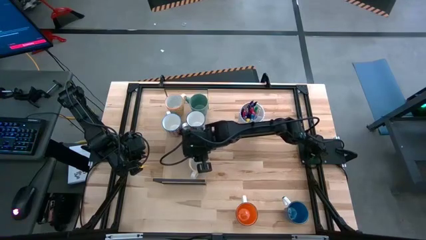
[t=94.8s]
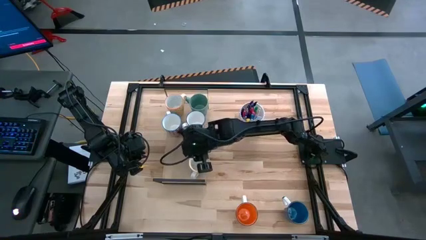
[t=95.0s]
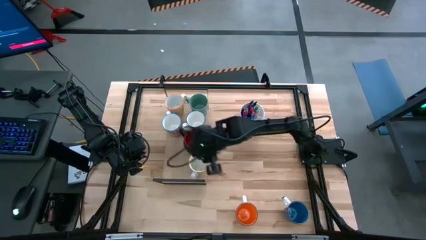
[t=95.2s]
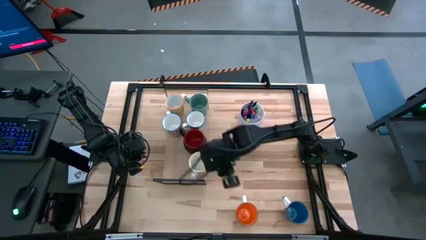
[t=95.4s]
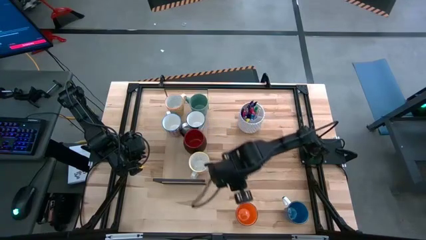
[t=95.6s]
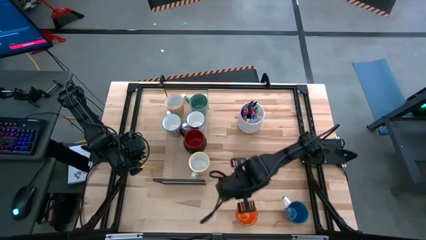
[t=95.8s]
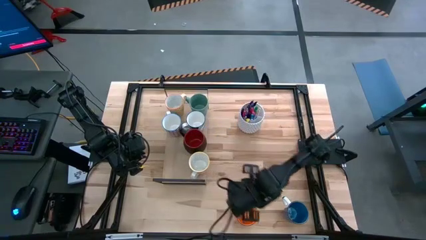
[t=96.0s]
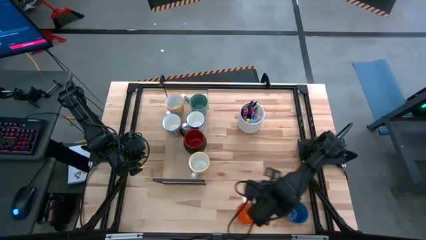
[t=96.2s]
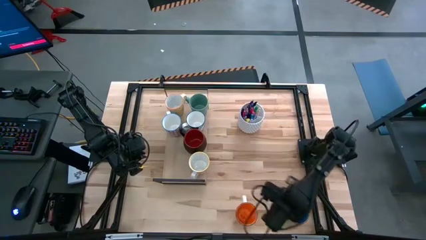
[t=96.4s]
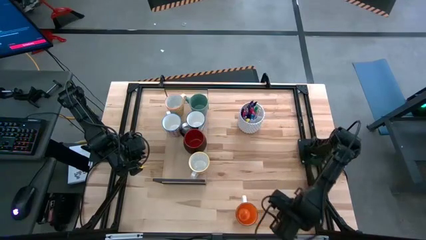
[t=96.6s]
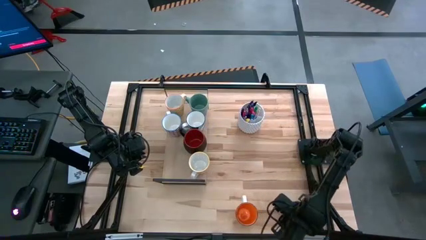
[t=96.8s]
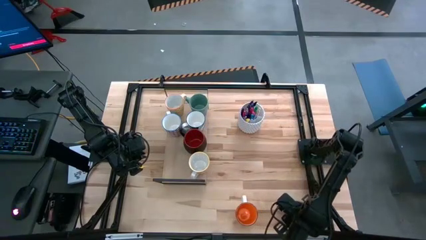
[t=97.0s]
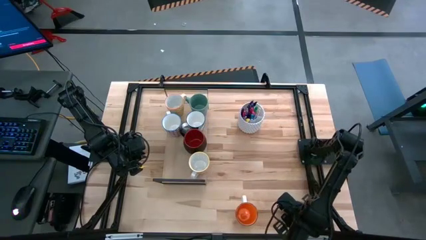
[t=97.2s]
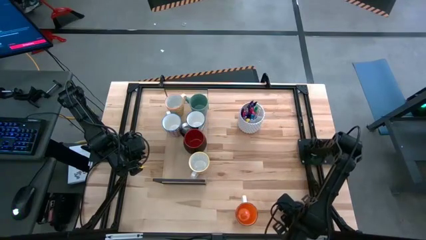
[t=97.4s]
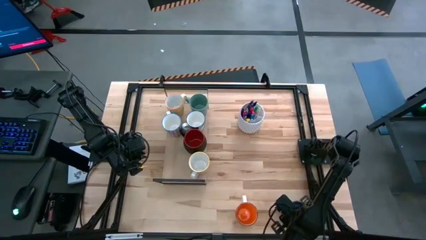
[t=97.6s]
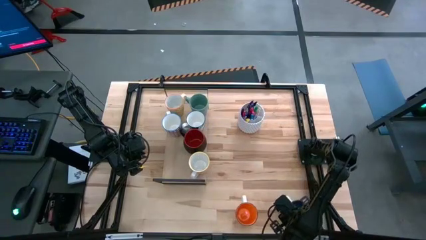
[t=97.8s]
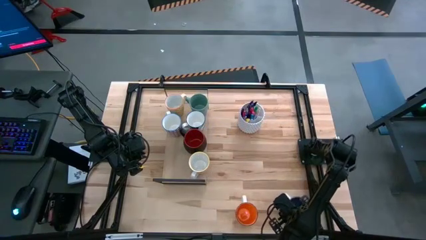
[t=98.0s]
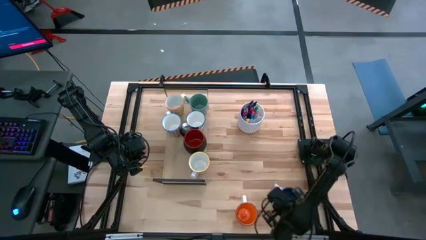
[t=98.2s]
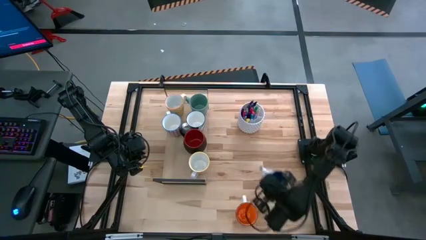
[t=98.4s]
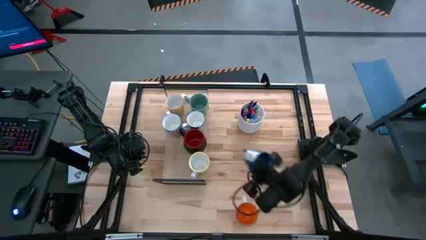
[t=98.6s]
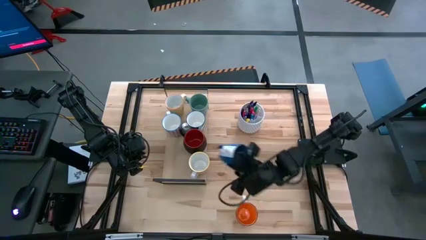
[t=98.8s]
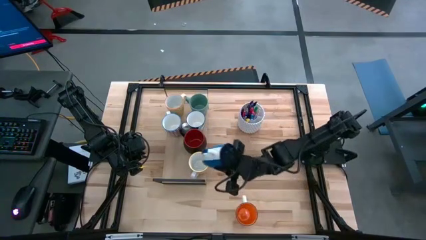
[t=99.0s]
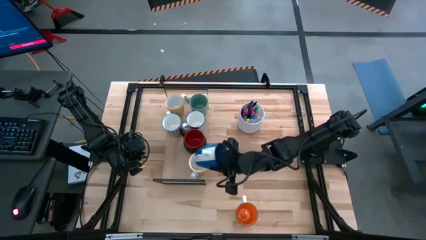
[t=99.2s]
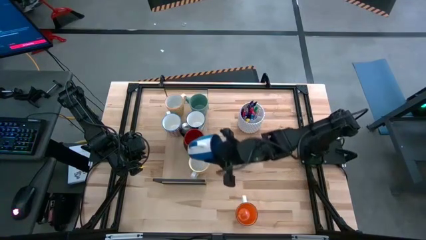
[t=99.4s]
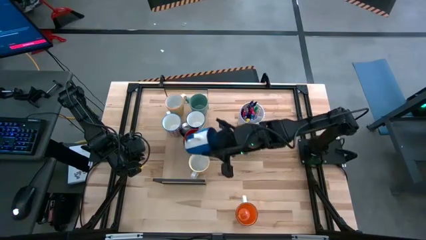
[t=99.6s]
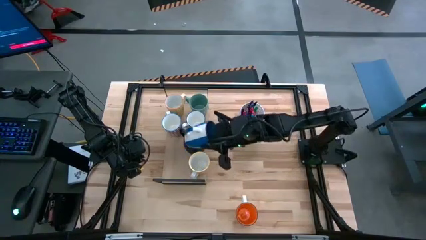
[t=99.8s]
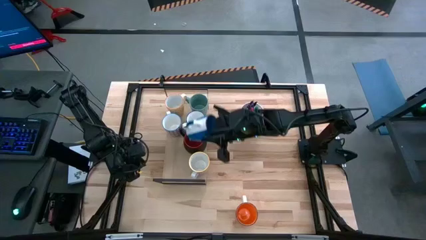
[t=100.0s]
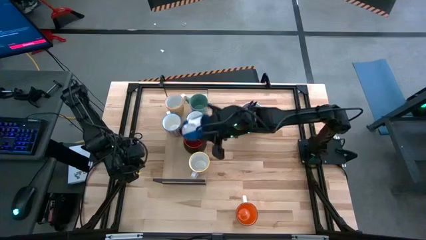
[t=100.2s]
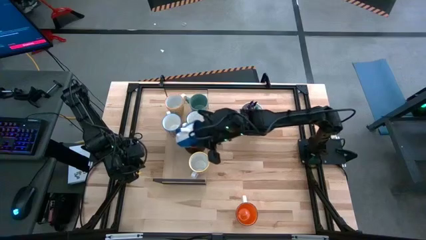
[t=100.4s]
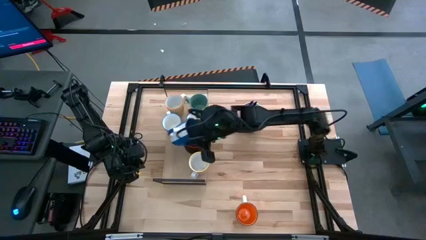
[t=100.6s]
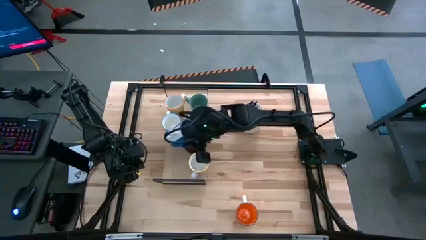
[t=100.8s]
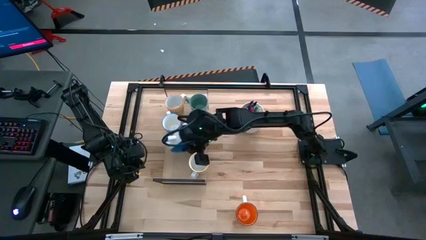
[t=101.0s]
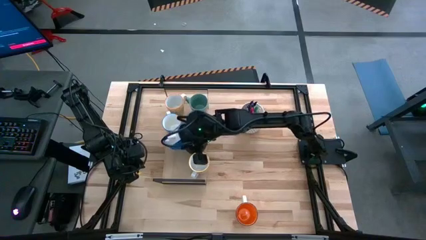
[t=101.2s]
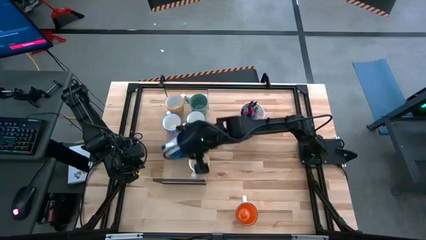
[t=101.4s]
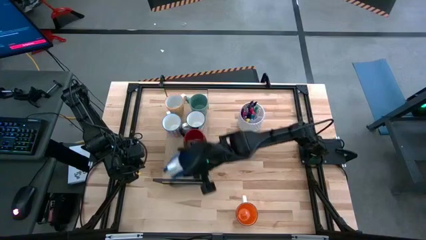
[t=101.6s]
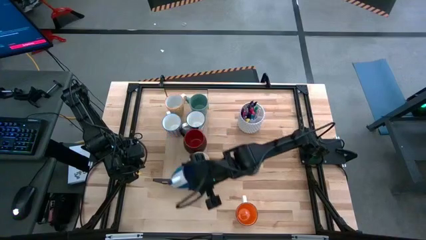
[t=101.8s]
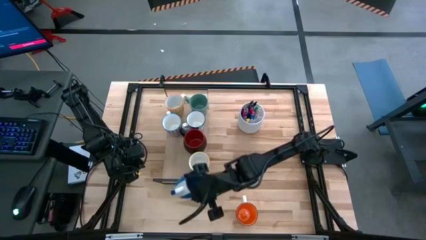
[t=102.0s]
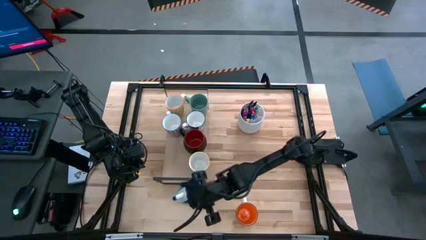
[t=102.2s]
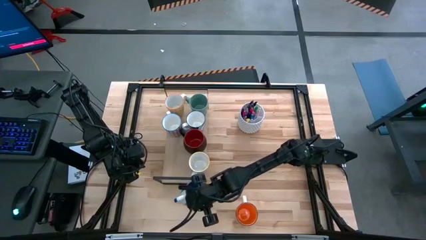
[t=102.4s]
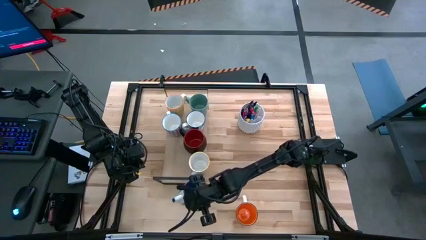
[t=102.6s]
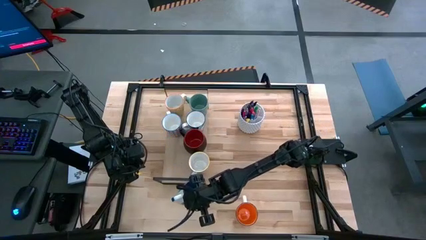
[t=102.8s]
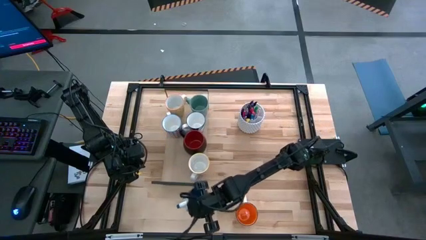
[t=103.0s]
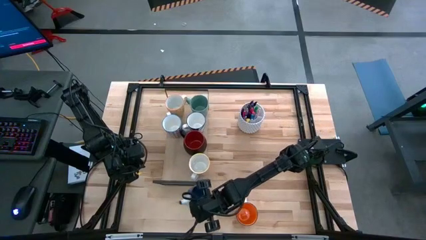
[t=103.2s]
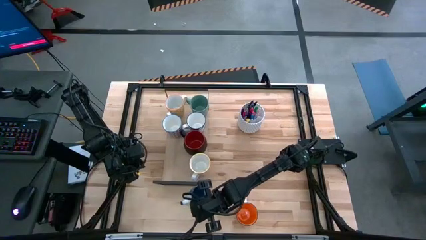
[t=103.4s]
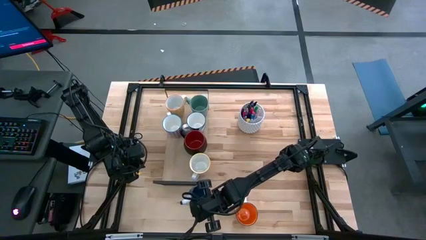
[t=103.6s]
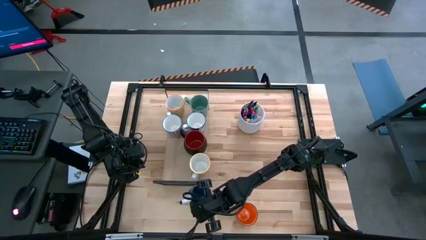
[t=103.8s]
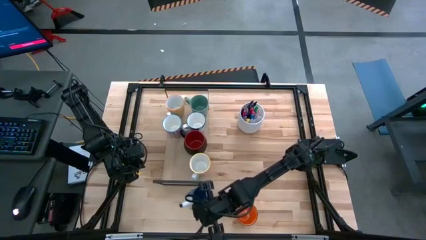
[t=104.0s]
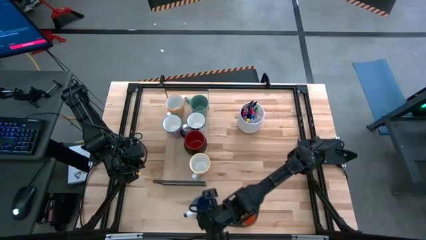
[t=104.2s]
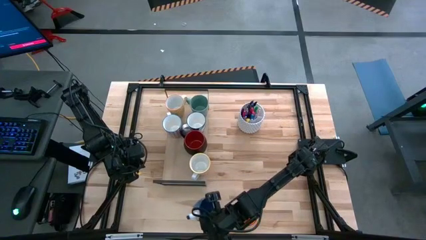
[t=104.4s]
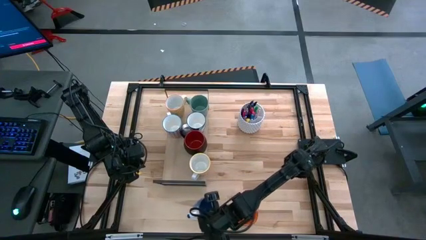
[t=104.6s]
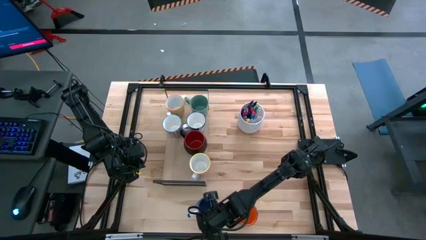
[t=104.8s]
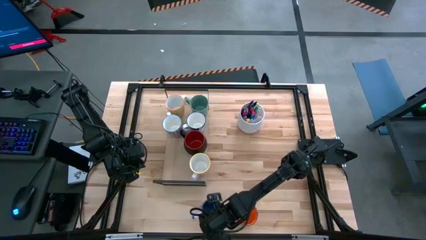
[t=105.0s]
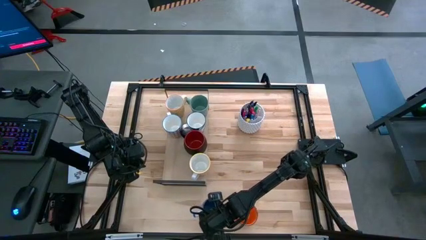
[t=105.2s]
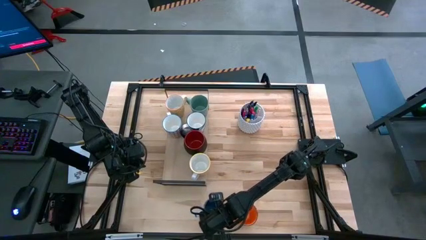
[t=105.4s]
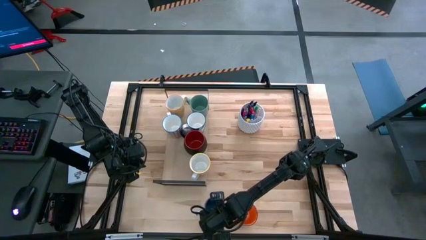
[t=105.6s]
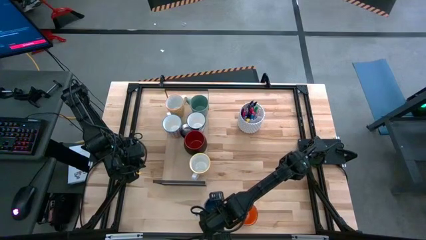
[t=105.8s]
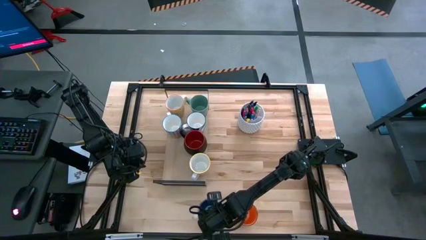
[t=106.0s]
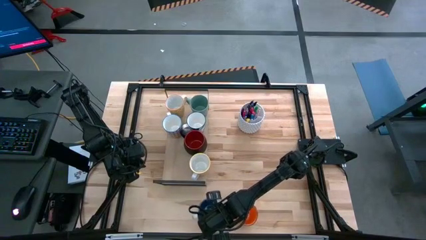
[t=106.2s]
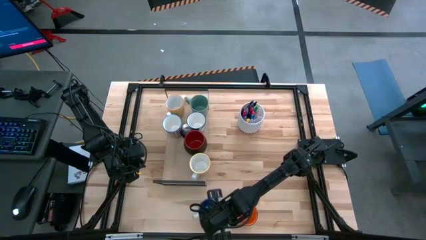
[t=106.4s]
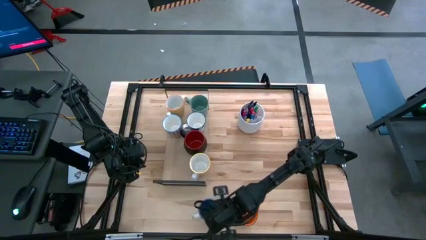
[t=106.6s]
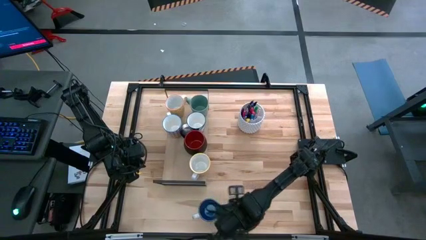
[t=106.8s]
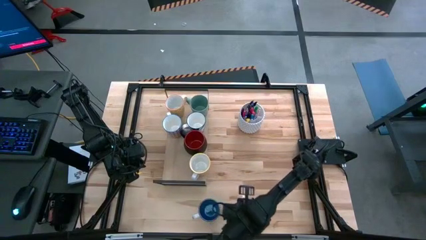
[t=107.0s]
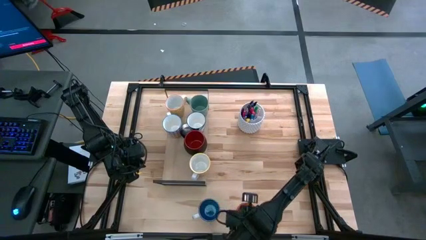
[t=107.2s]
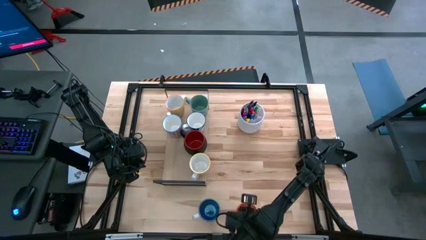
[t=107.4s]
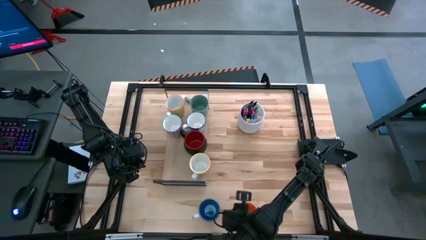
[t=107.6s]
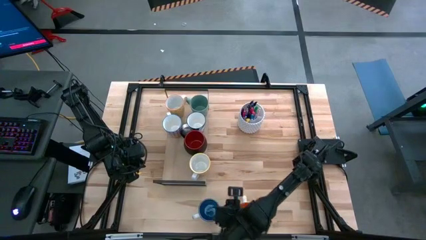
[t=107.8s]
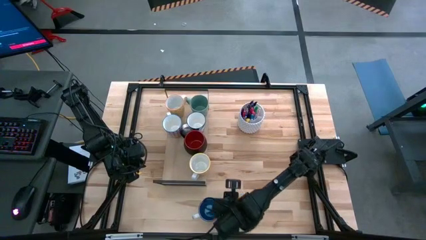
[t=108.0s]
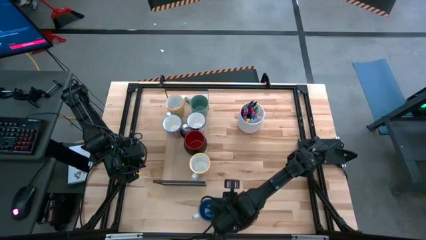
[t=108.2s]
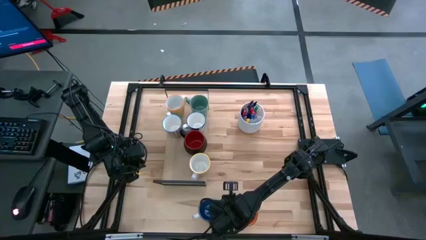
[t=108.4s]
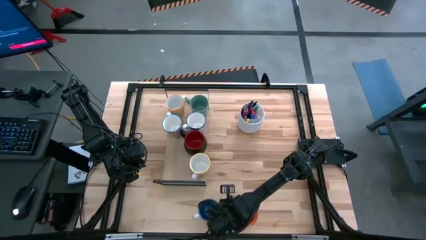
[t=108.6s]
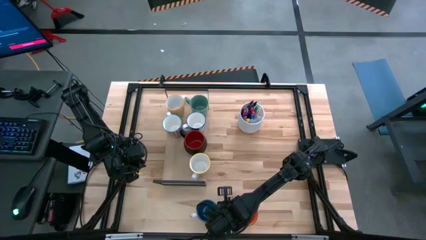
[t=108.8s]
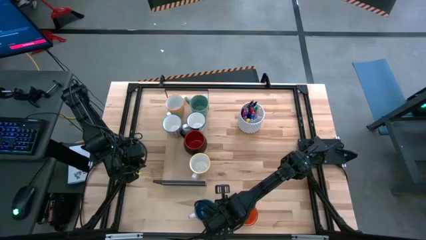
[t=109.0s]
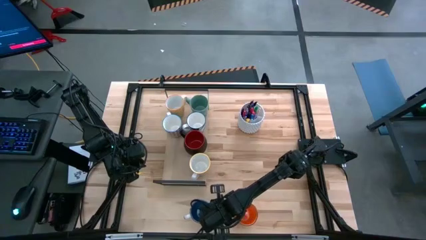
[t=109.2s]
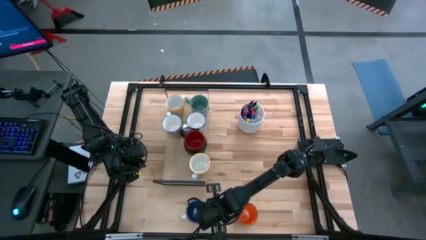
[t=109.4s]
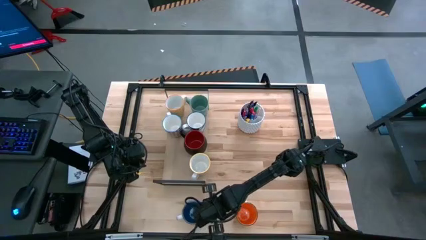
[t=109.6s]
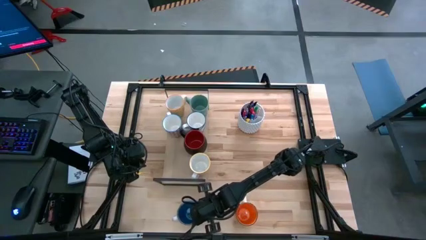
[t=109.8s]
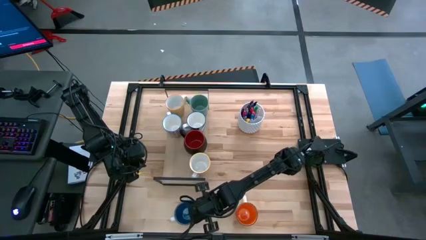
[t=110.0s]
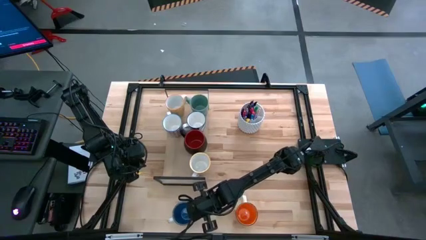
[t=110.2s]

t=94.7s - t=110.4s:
Task: Place coffee mugs
Move the blue mug to the bottom left of the table
